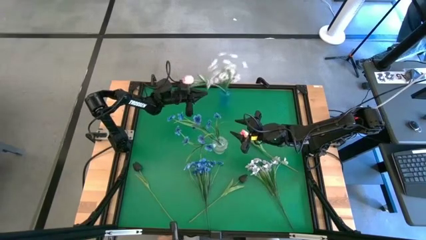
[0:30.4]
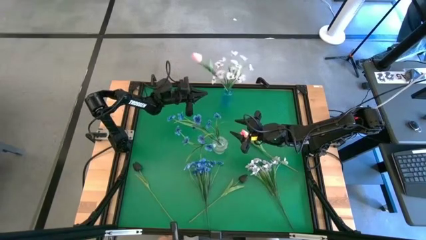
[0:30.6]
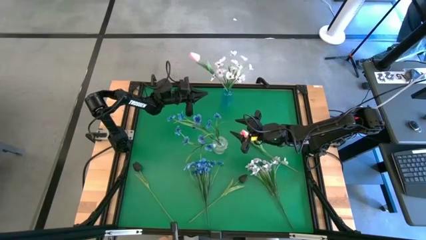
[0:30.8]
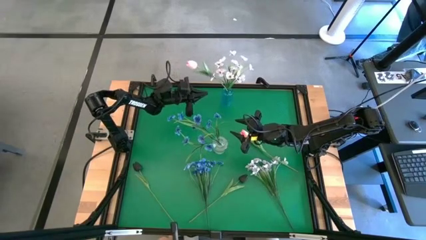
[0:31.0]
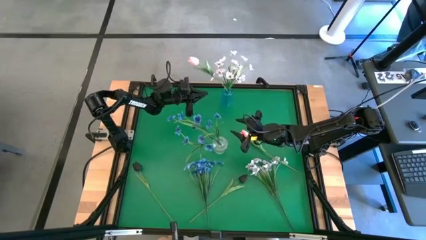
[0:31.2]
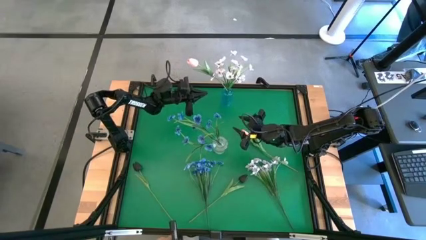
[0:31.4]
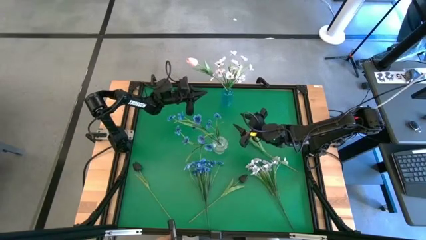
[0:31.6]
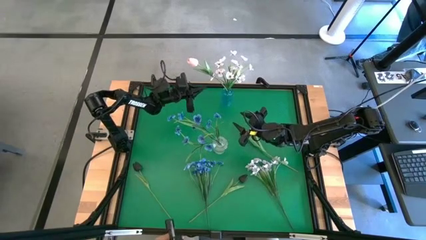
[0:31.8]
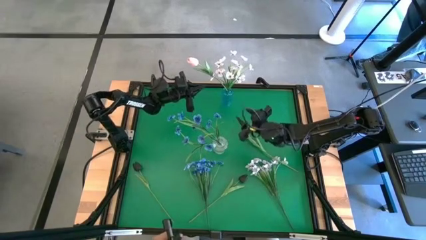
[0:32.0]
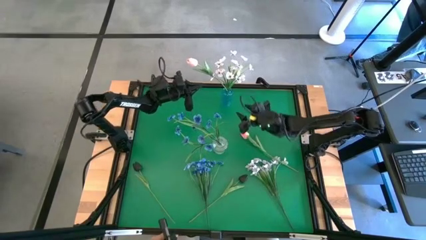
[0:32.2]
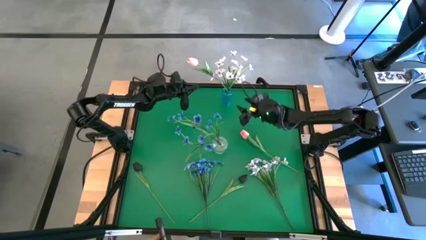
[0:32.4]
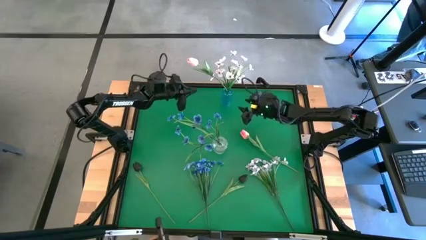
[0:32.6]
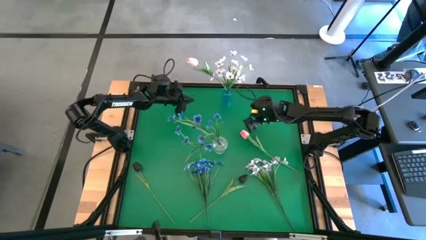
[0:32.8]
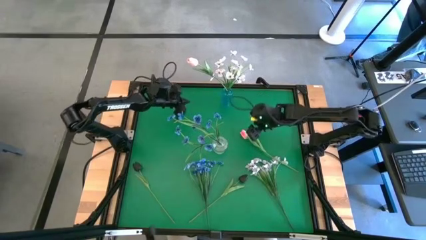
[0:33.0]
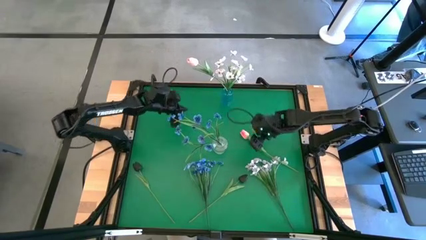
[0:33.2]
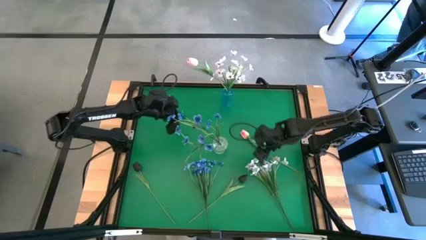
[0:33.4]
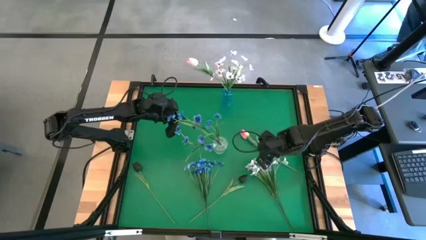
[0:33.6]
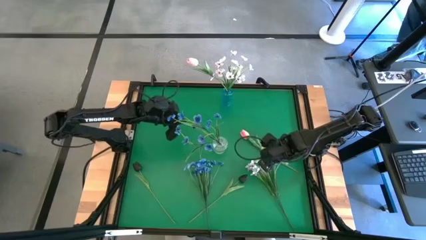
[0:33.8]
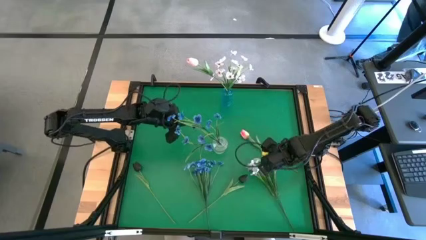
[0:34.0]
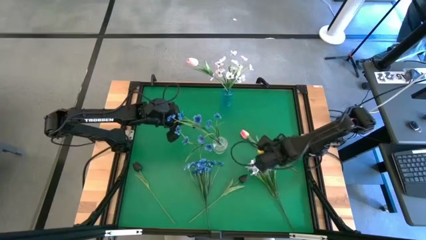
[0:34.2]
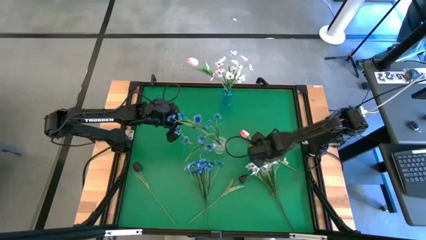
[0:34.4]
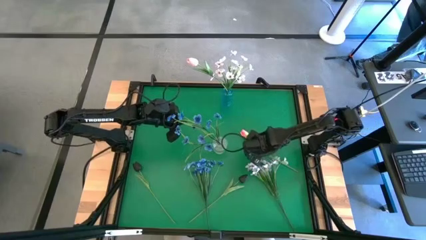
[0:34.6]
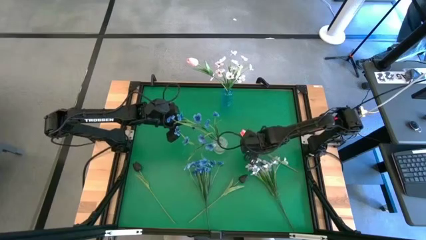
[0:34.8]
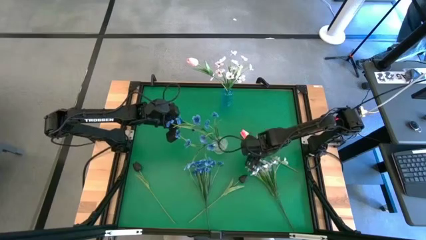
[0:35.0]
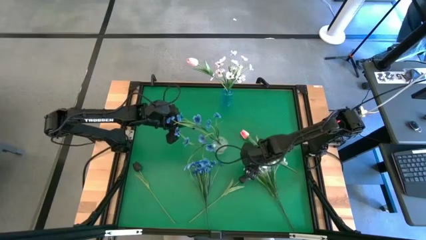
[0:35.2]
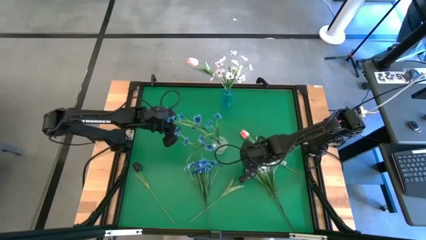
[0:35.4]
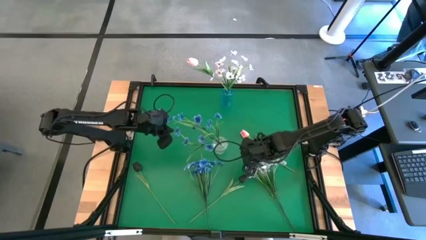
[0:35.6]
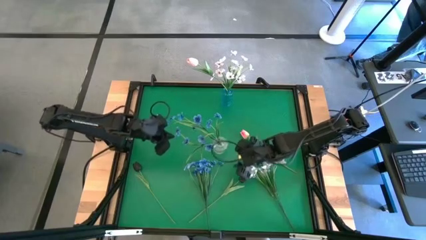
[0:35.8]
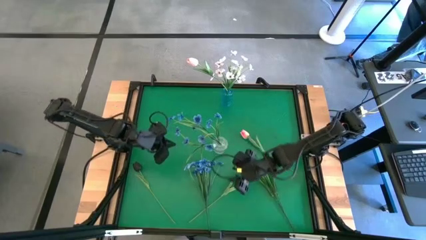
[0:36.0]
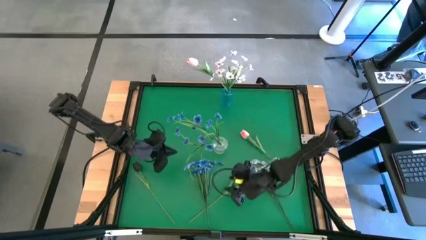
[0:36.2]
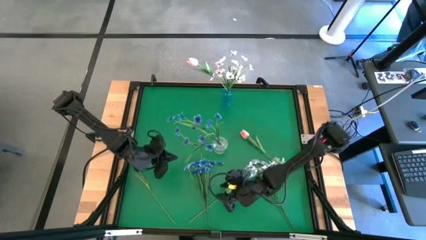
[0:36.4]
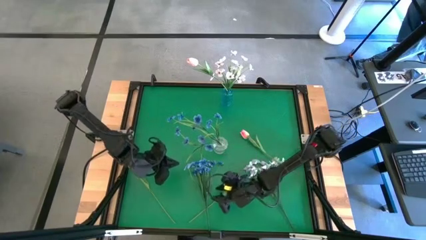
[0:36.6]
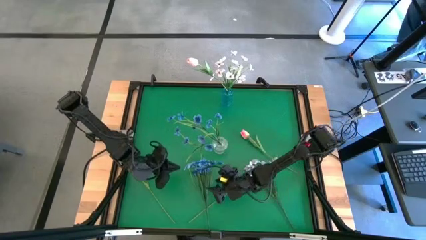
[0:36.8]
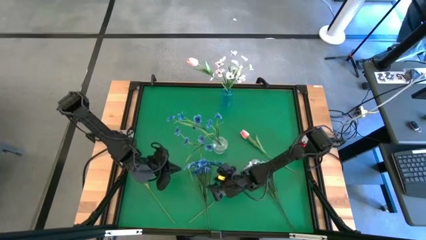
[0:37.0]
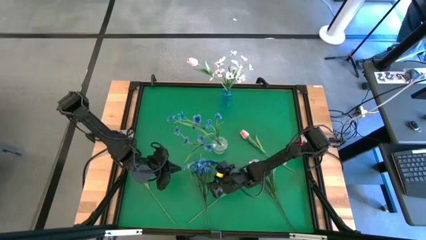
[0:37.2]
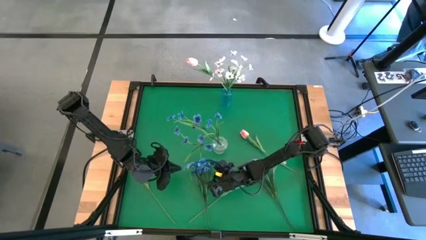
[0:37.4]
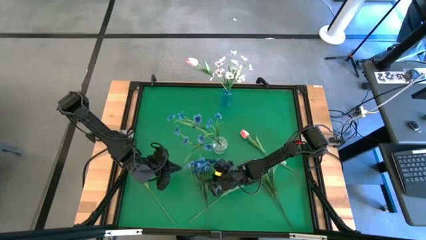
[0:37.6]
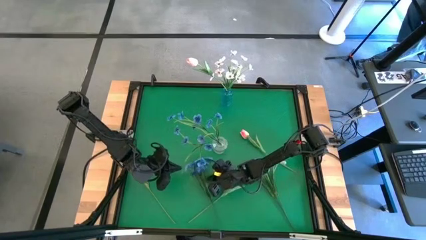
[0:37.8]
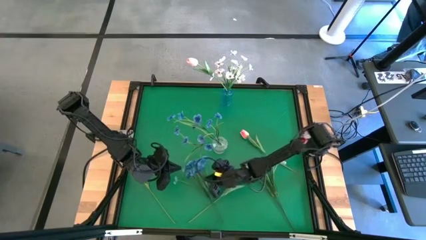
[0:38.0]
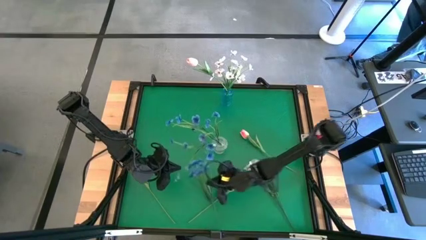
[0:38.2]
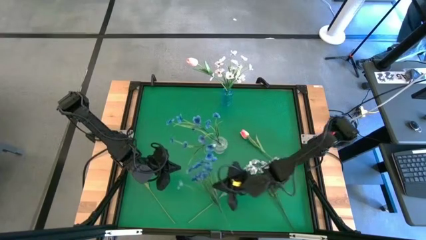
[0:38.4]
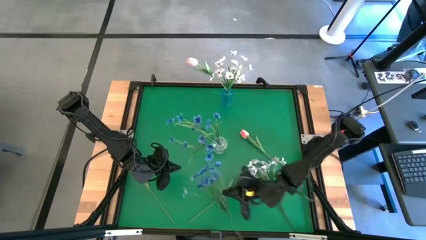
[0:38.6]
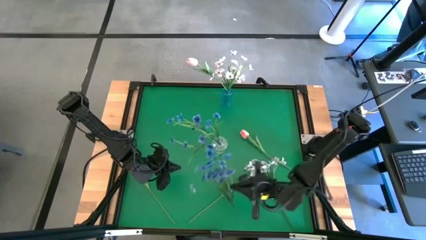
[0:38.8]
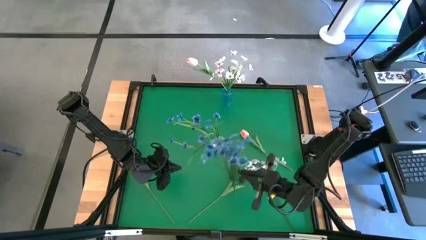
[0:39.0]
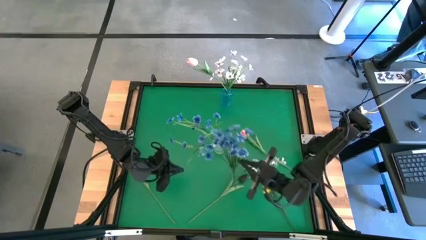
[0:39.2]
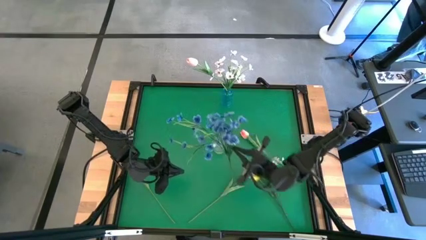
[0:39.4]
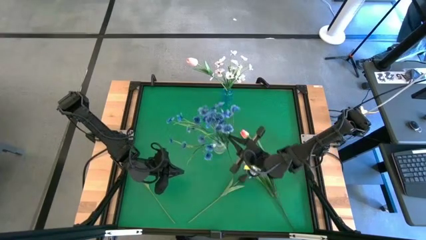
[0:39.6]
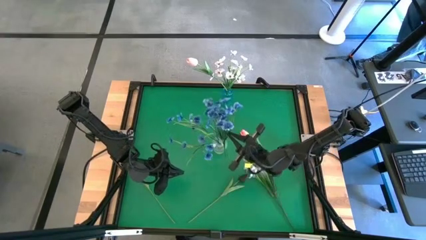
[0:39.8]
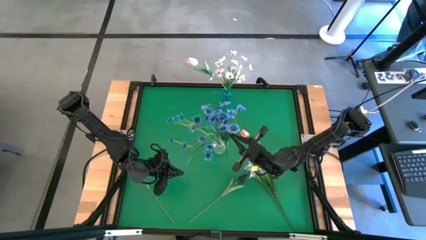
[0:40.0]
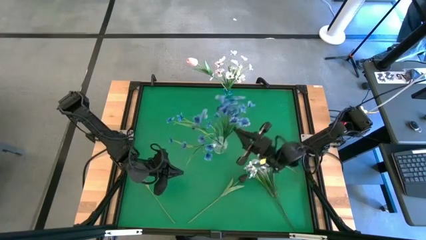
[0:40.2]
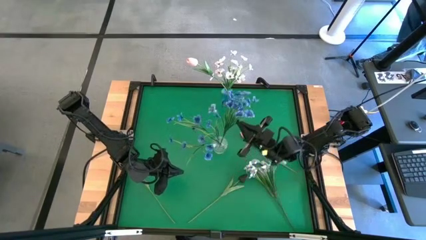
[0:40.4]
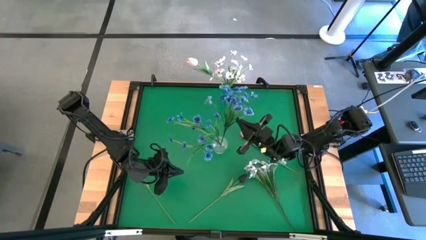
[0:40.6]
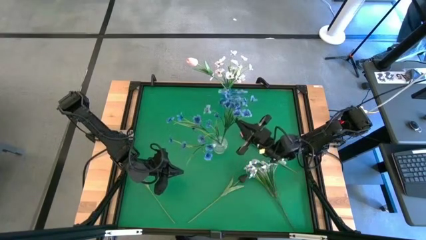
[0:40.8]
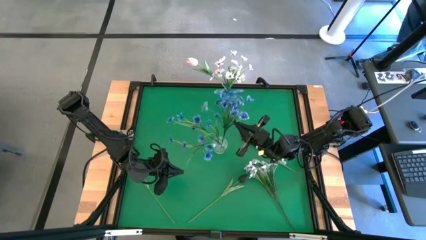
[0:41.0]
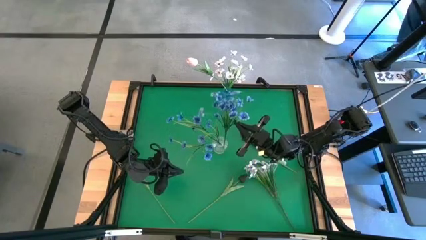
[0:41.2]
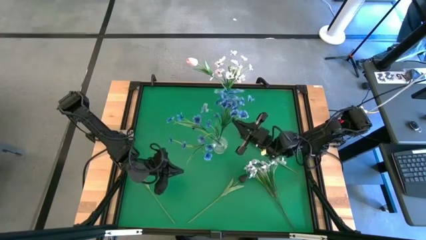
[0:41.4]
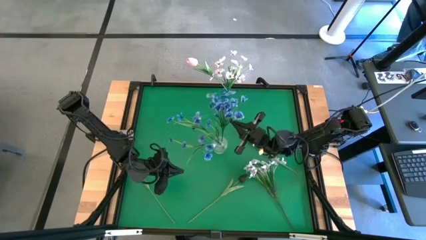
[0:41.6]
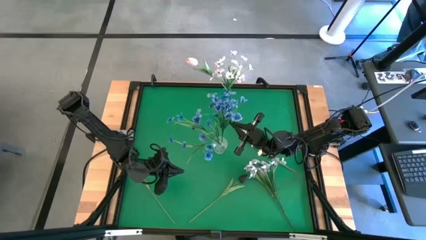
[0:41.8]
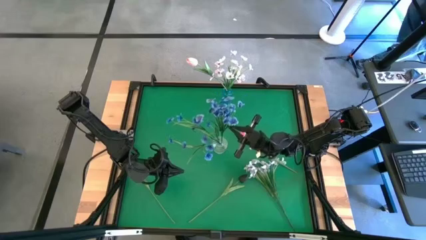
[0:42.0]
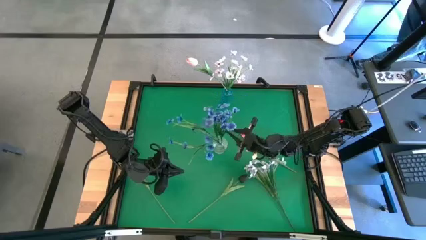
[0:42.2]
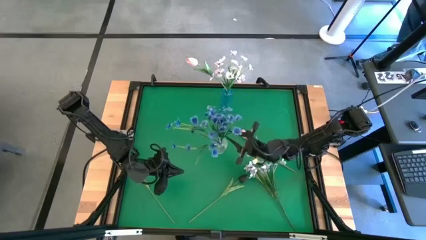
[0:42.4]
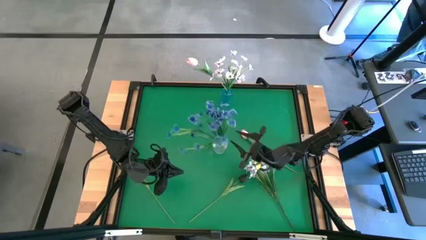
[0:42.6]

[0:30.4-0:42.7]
Task: Sort flowers into vase by color
Put the blue flowers into the transparent vase
